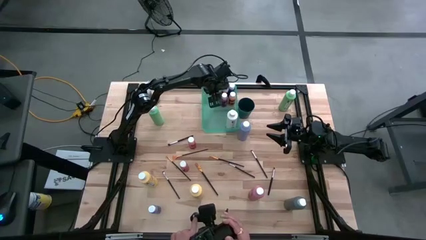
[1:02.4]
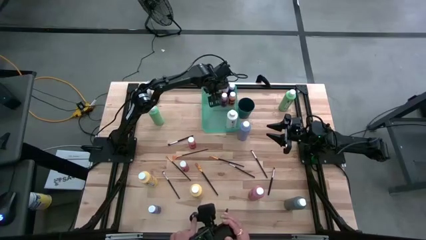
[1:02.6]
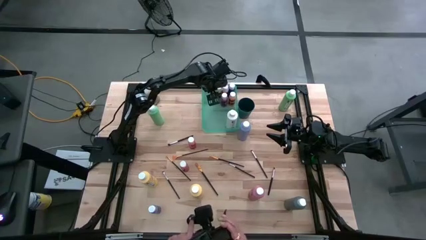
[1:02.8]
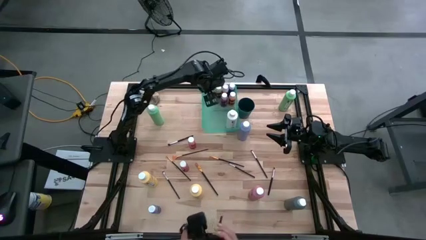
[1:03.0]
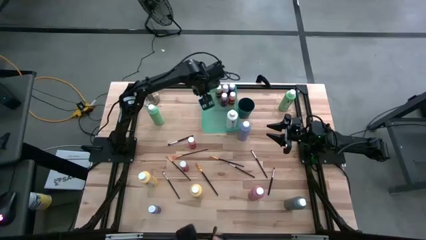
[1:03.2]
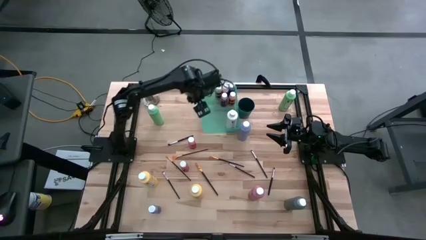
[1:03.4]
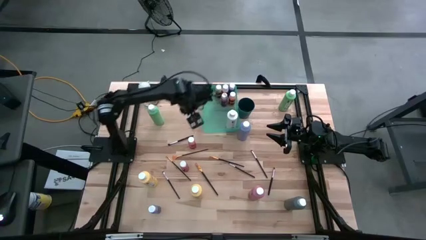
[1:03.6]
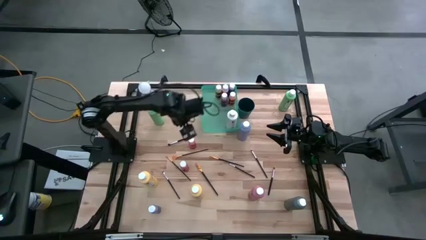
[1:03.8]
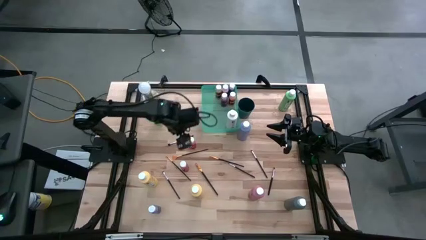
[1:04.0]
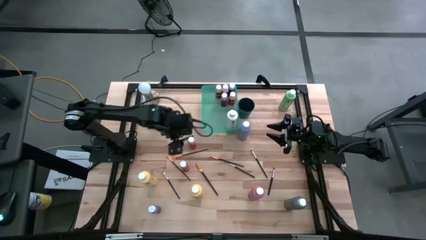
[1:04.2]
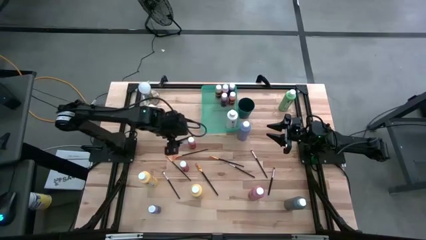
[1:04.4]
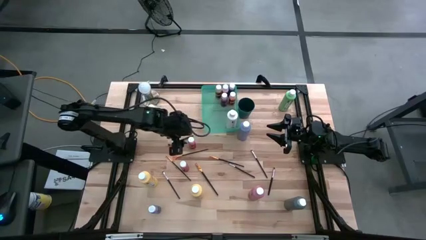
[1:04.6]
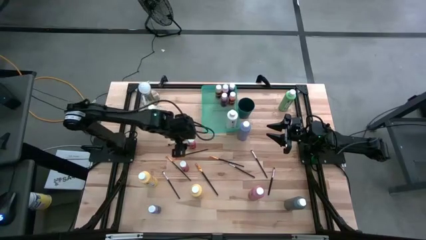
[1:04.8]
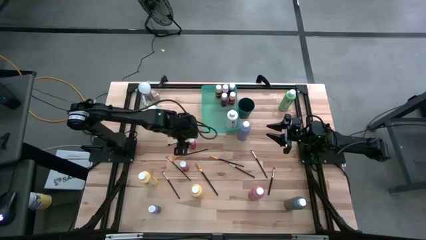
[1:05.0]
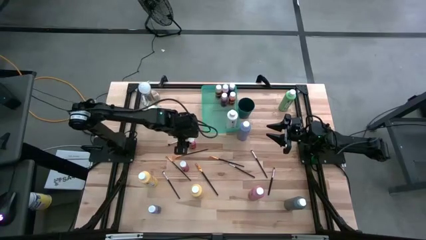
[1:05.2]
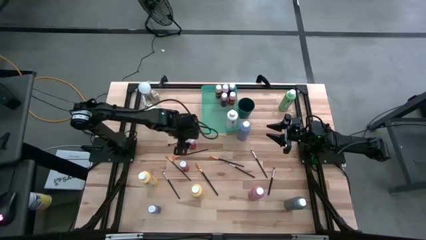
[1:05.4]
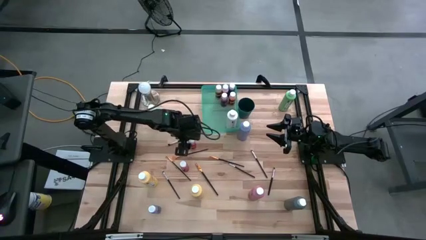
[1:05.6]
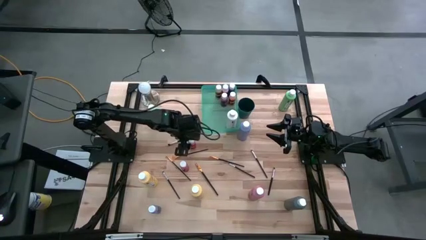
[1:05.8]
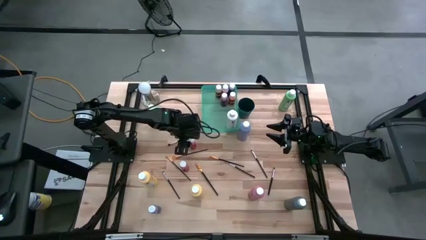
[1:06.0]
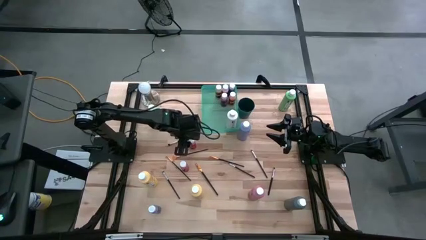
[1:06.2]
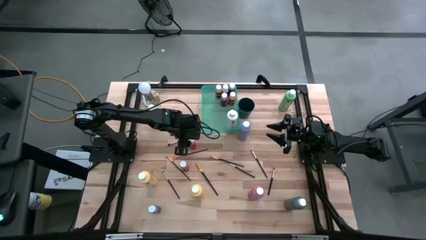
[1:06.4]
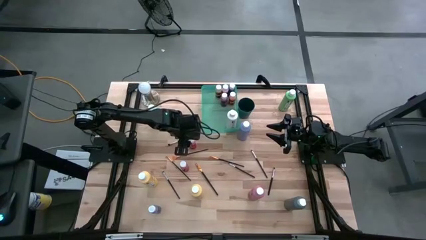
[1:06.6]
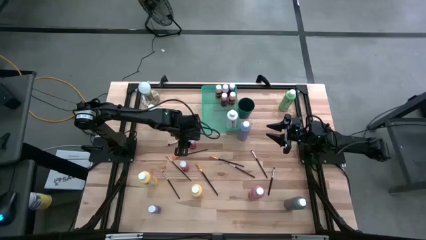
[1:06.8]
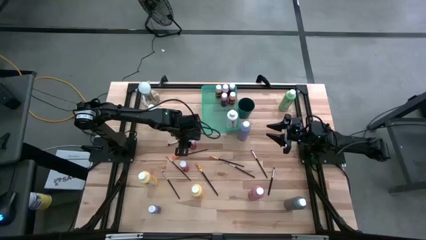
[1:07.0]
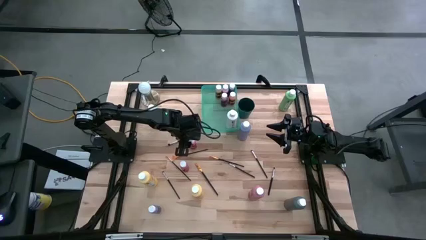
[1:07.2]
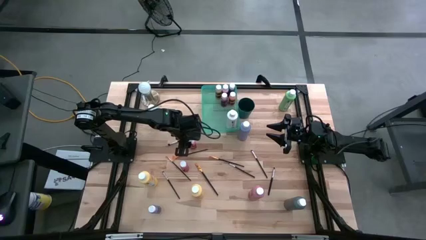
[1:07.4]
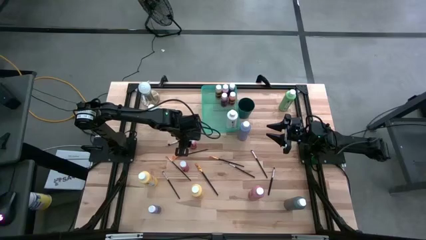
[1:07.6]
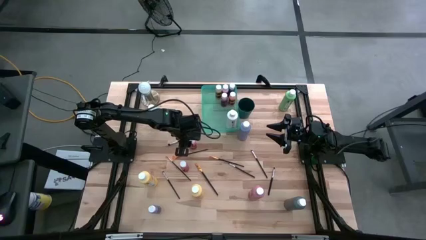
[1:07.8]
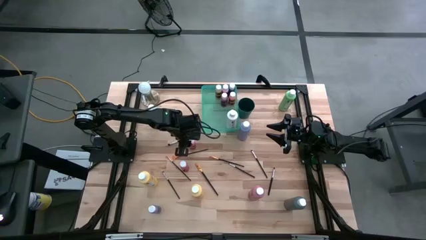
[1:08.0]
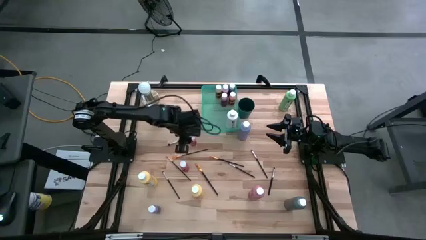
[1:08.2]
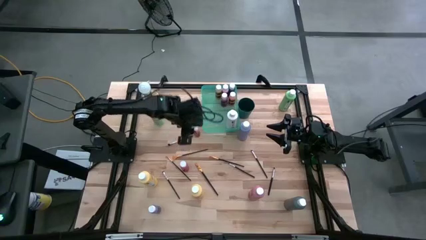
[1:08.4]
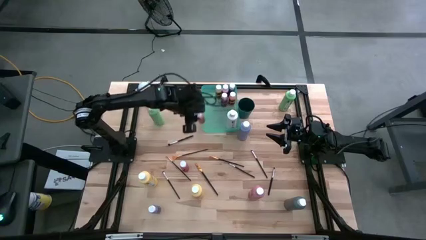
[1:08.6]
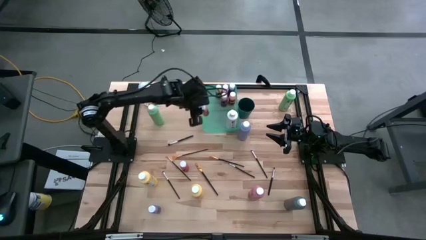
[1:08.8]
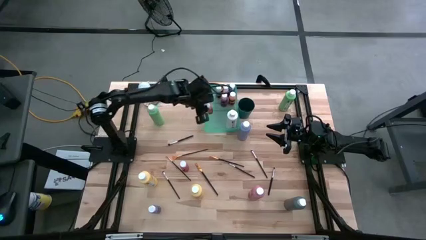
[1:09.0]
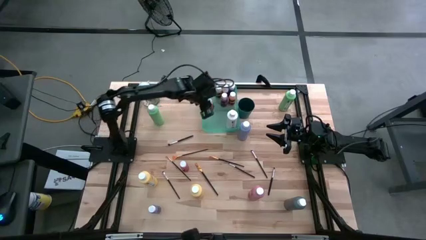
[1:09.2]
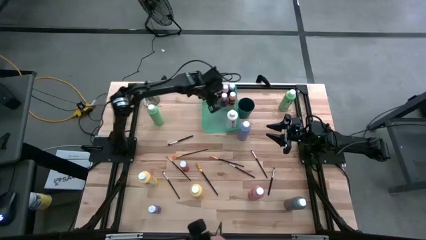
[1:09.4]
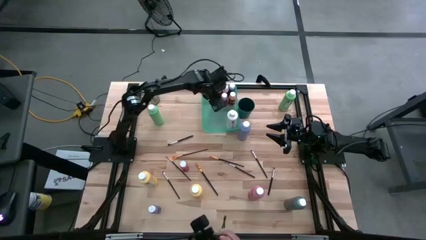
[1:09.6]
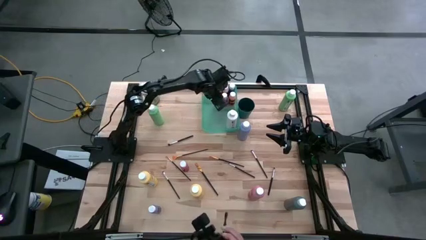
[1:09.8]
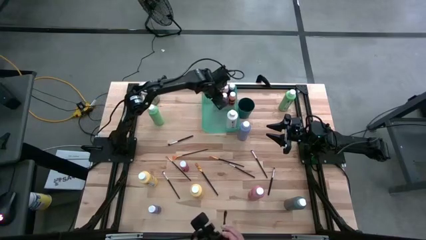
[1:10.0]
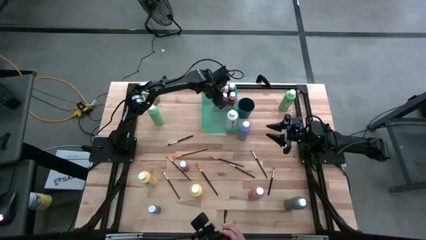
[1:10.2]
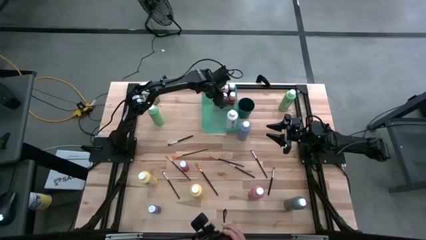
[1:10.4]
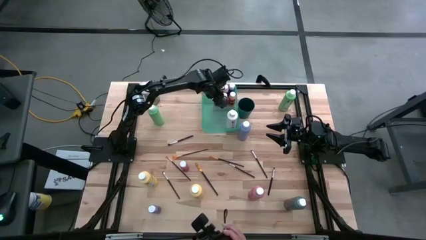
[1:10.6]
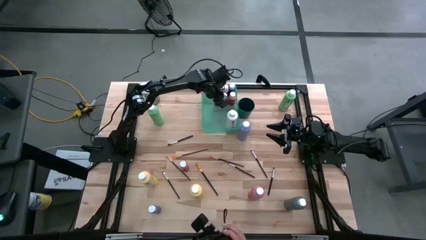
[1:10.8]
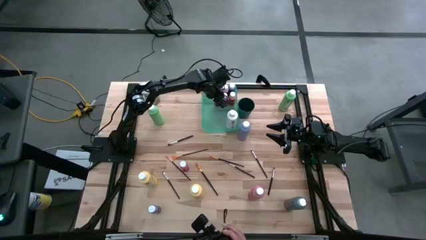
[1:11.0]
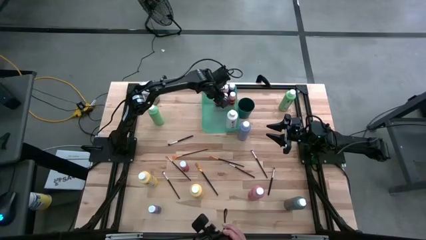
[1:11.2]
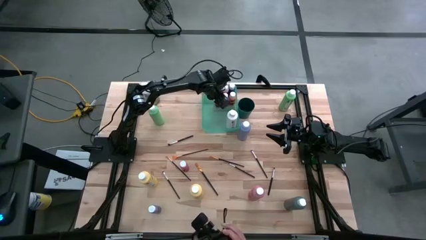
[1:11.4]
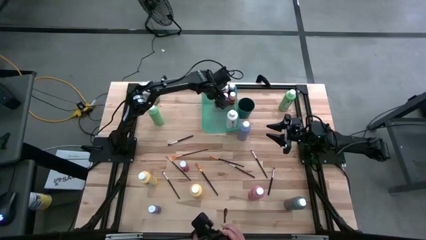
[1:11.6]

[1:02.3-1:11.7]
Task: Pick & Place Paint Supplies
Put the top orange paint bottle into the green bin

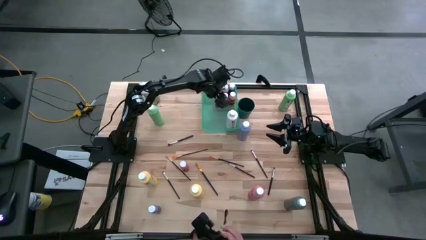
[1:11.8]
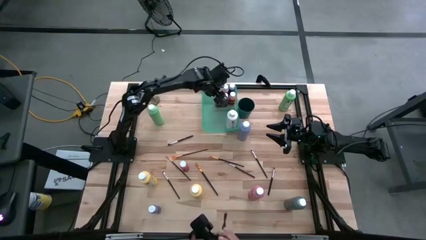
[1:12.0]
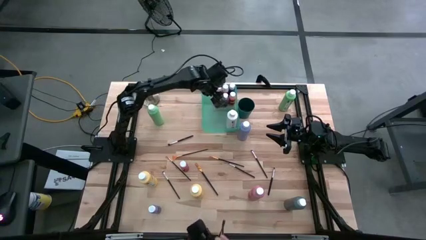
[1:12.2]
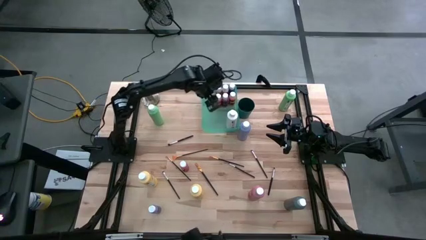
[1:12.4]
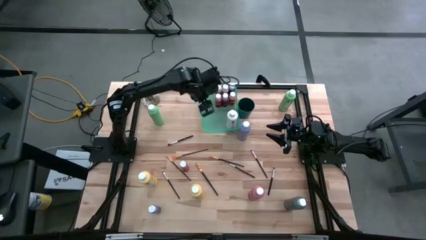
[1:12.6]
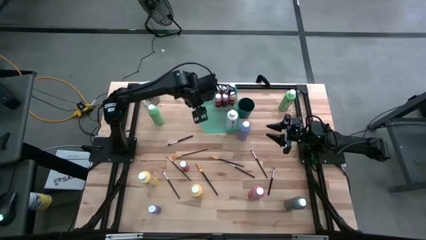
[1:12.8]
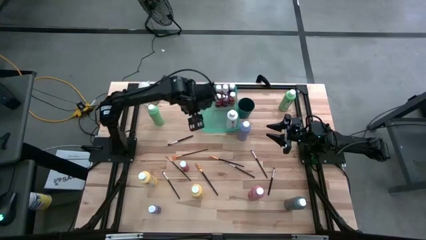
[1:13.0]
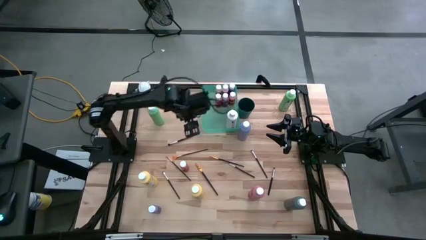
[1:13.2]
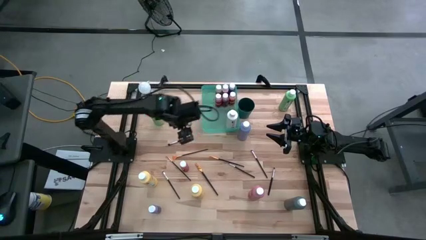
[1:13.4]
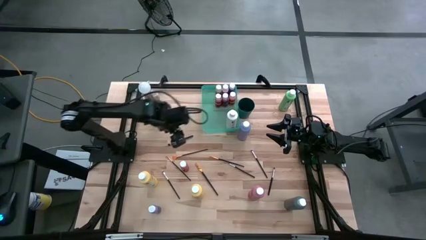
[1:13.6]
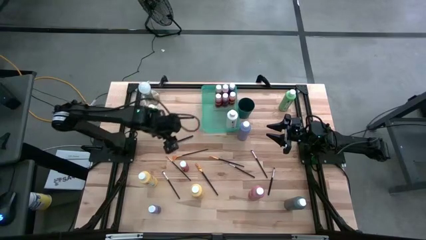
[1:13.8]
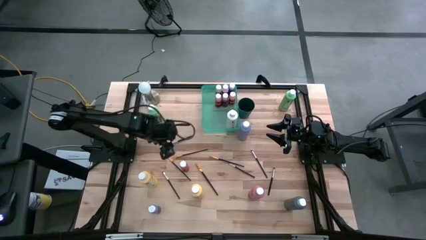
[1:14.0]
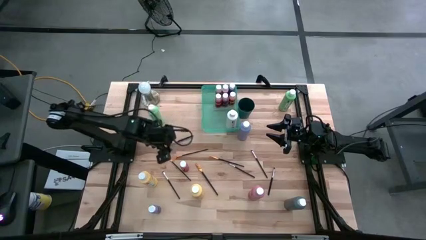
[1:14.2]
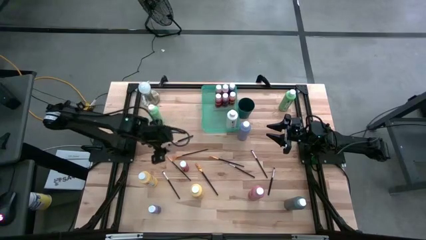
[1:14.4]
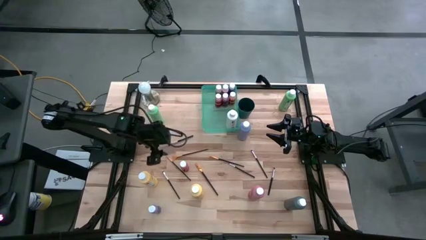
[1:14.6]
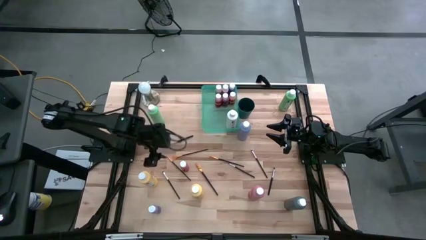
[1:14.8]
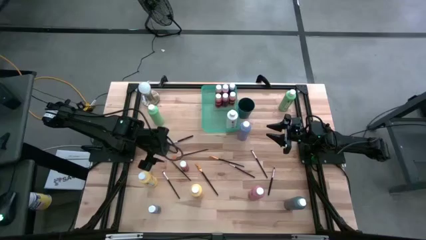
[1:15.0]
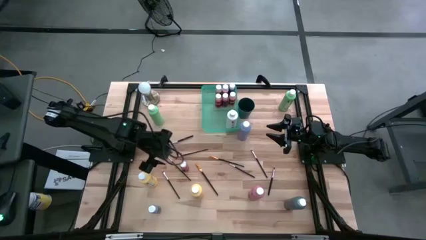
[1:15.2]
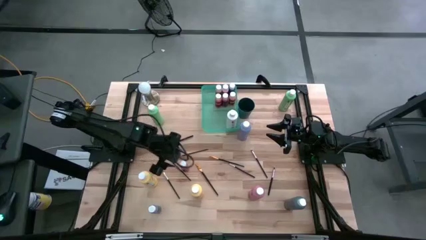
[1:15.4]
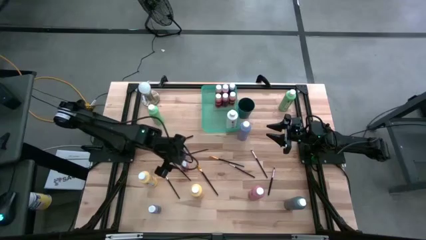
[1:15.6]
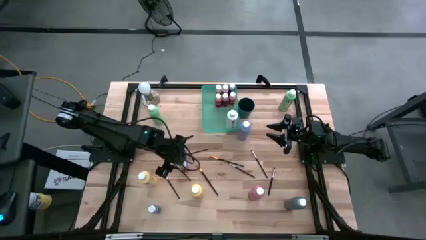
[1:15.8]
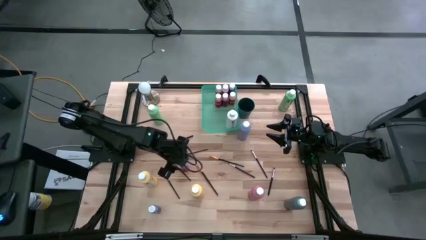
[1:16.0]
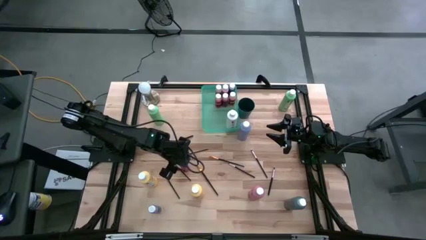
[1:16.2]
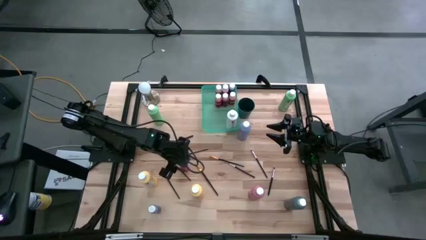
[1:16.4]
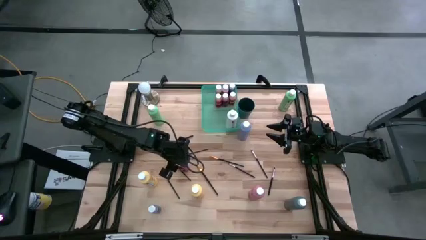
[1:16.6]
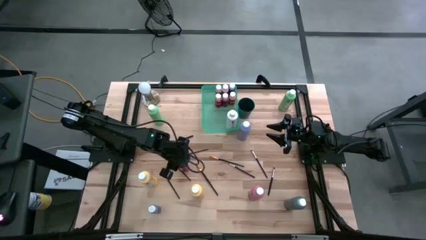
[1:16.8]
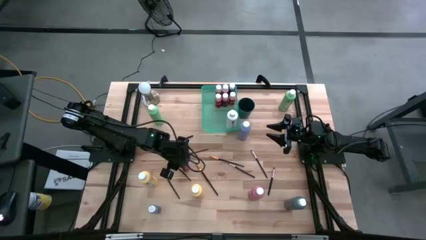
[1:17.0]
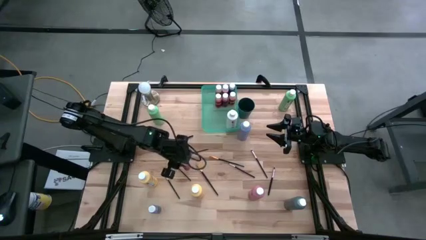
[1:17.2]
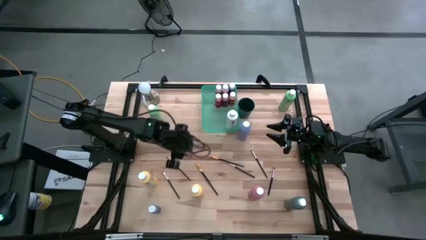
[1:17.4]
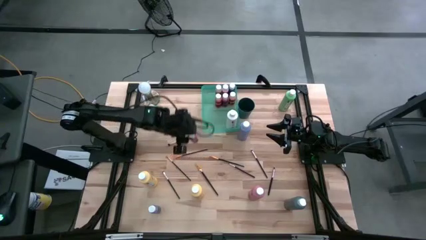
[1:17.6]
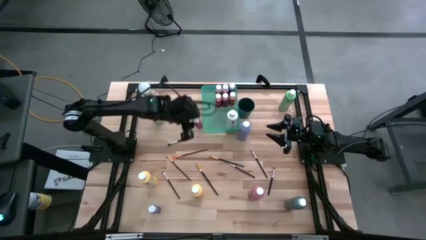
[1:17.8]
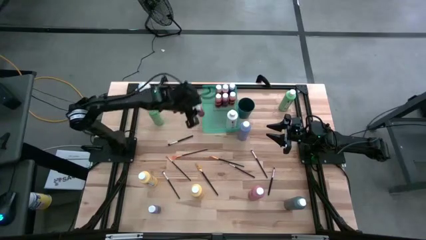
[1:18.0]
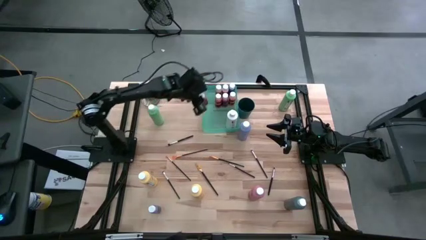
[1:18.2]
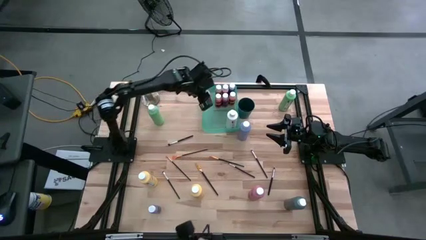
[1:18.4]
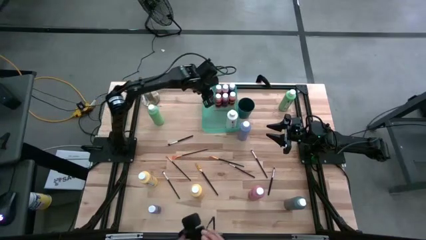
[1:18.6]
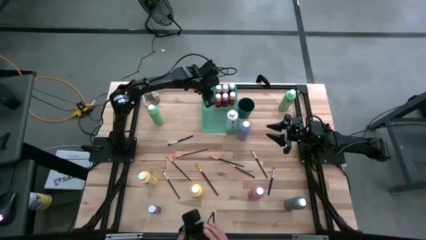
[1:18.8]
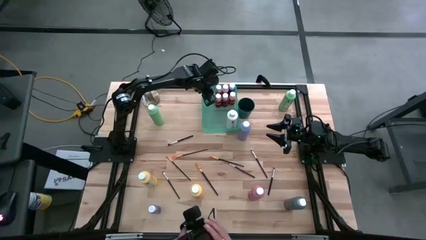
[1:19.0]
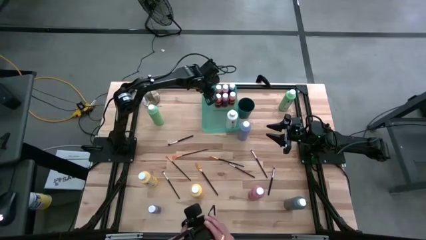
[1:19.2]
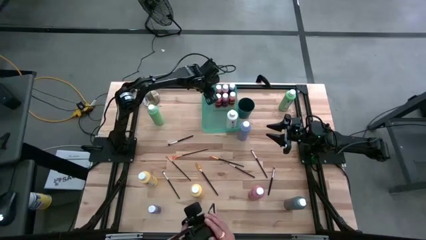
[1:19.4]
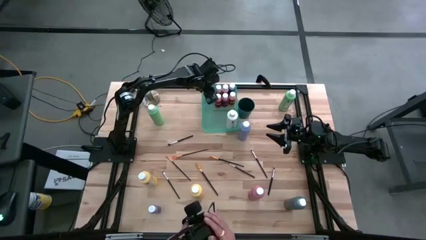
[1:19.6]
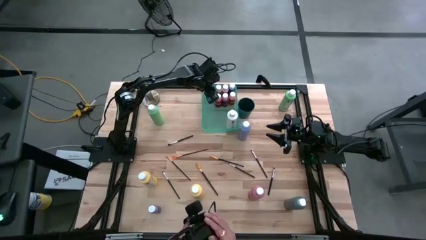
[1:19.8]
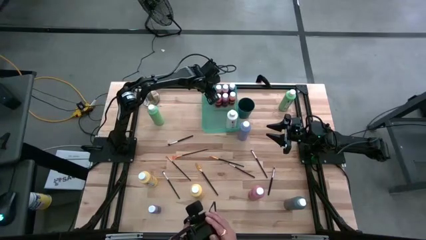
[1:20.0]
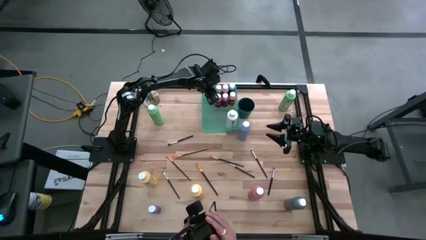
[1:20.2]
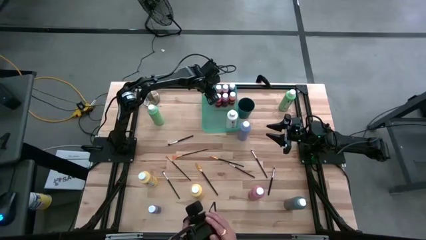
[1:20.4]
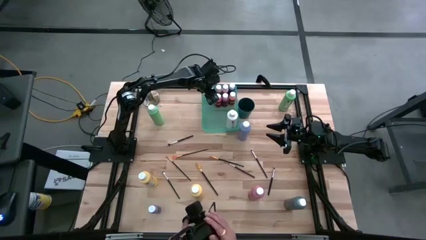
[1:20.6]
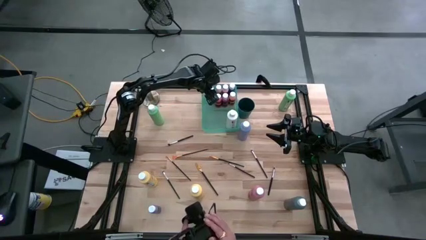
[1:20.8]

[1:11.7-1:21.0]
Put the orange paint bottle into the green bin
